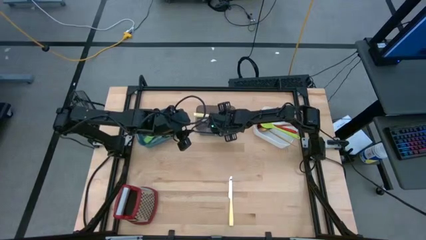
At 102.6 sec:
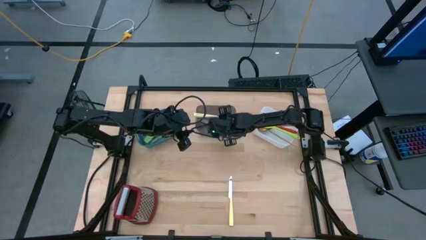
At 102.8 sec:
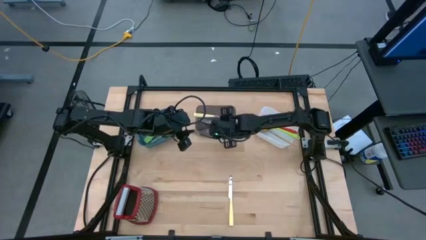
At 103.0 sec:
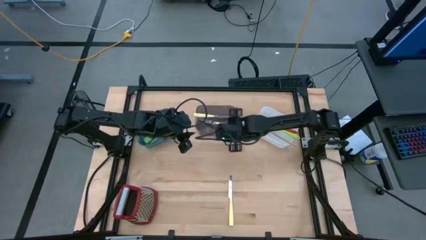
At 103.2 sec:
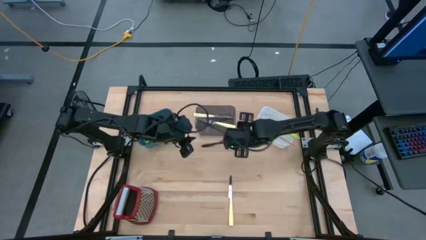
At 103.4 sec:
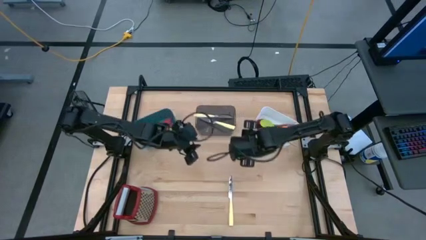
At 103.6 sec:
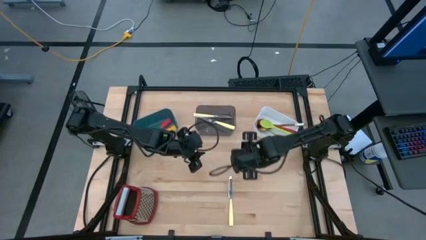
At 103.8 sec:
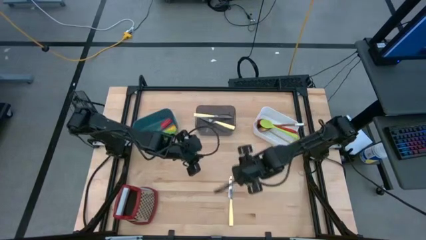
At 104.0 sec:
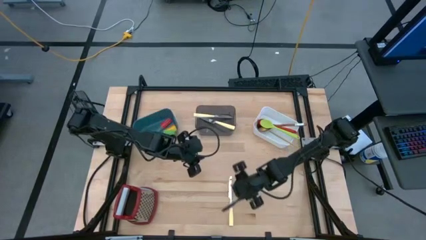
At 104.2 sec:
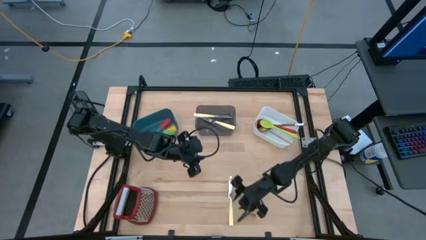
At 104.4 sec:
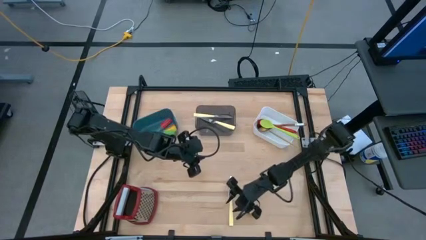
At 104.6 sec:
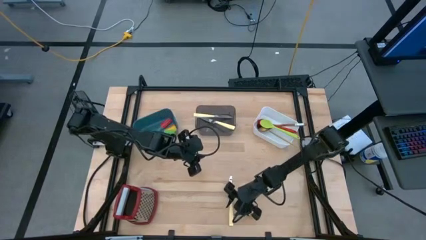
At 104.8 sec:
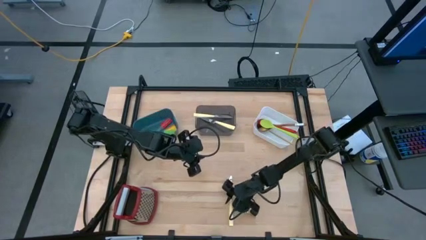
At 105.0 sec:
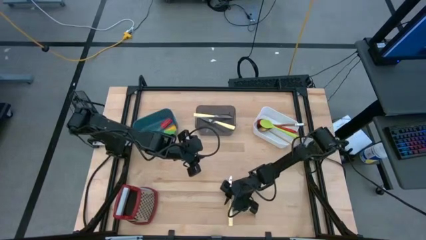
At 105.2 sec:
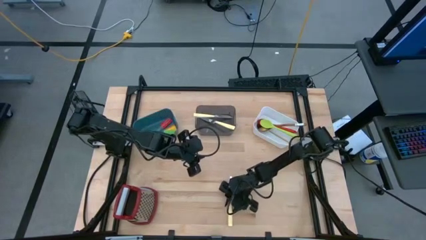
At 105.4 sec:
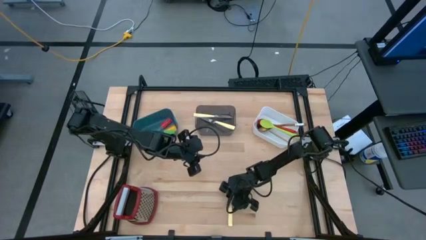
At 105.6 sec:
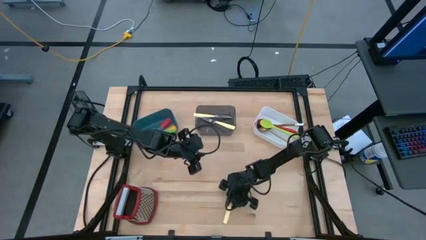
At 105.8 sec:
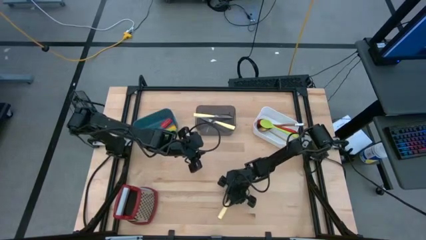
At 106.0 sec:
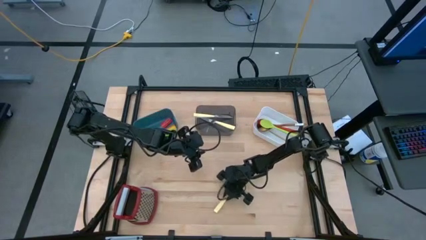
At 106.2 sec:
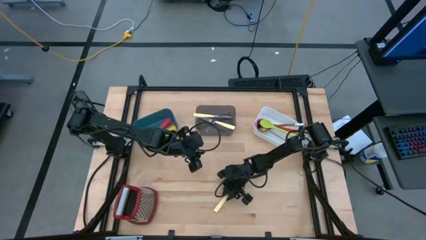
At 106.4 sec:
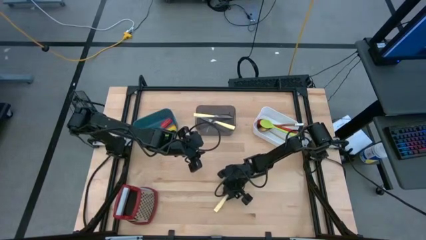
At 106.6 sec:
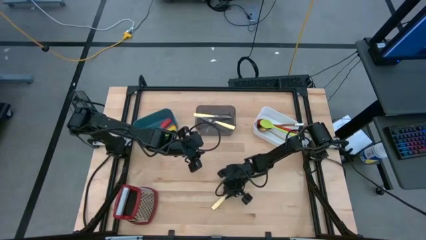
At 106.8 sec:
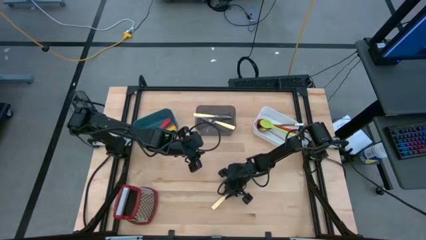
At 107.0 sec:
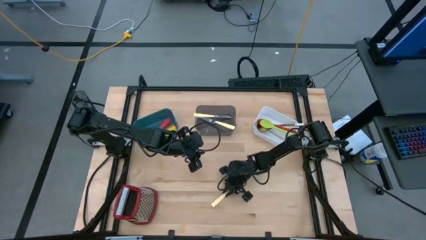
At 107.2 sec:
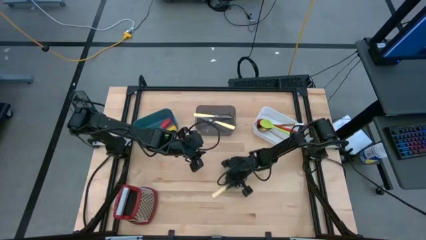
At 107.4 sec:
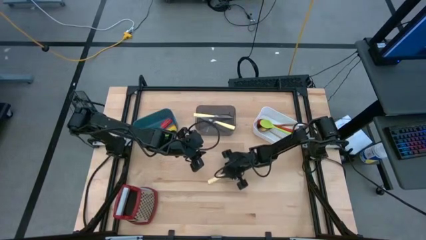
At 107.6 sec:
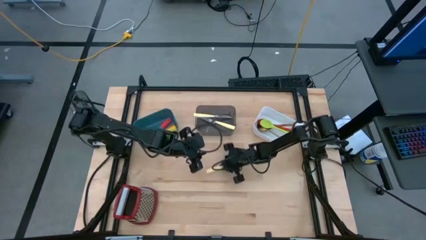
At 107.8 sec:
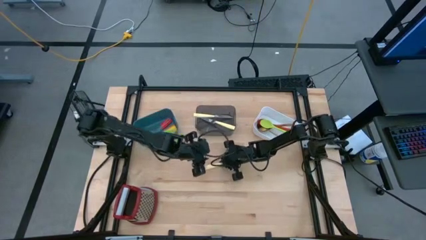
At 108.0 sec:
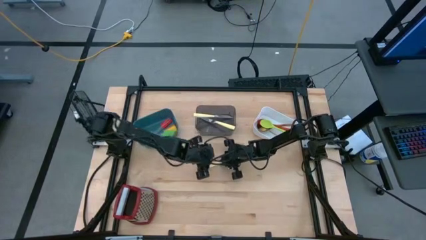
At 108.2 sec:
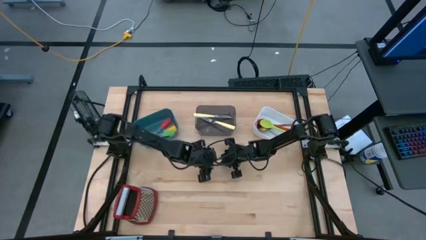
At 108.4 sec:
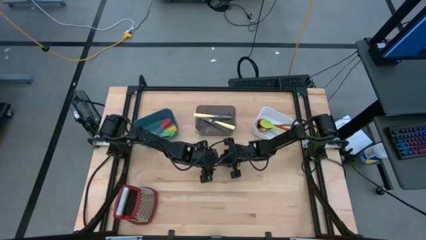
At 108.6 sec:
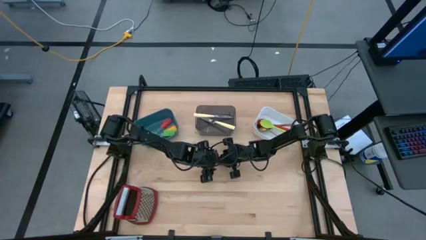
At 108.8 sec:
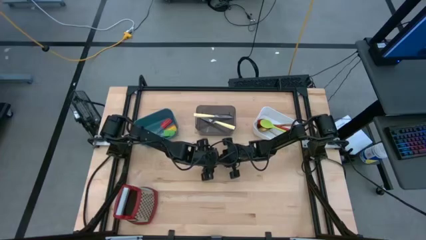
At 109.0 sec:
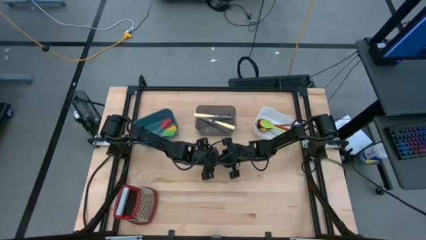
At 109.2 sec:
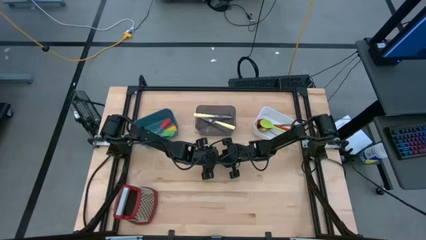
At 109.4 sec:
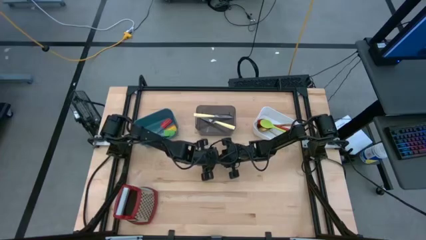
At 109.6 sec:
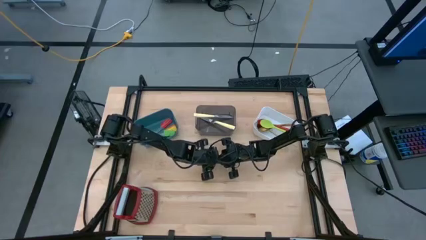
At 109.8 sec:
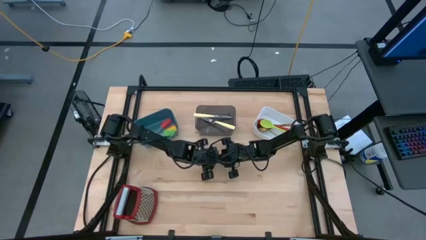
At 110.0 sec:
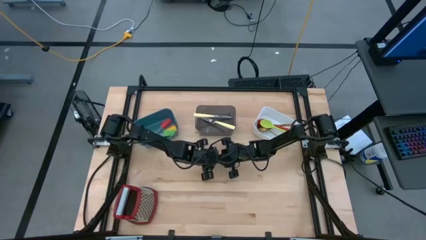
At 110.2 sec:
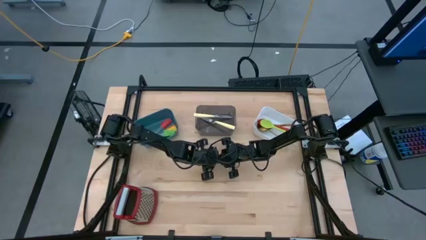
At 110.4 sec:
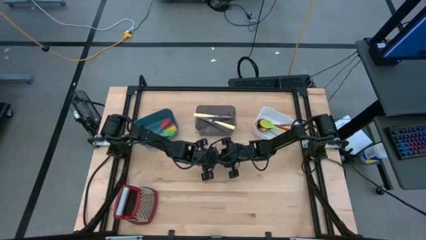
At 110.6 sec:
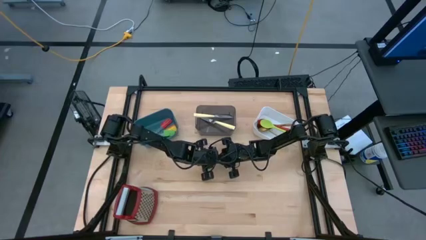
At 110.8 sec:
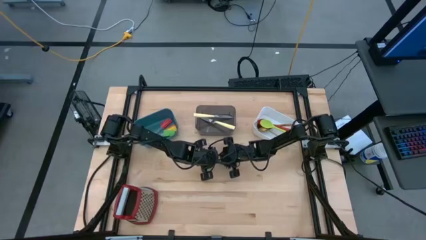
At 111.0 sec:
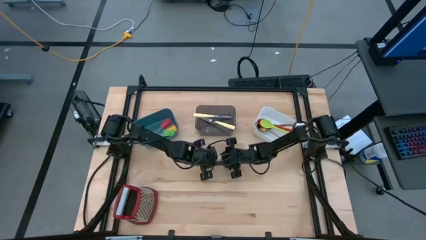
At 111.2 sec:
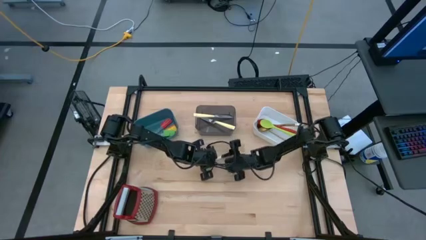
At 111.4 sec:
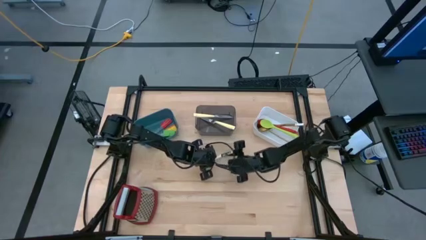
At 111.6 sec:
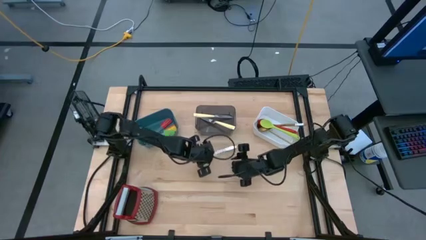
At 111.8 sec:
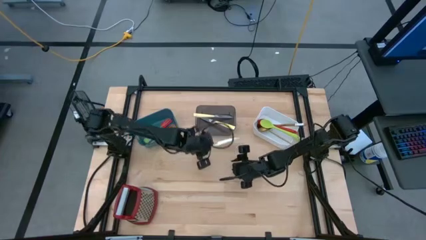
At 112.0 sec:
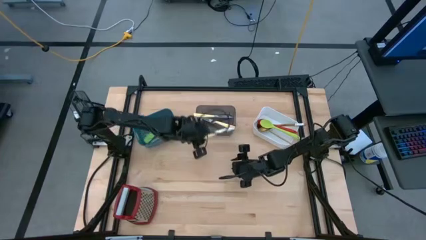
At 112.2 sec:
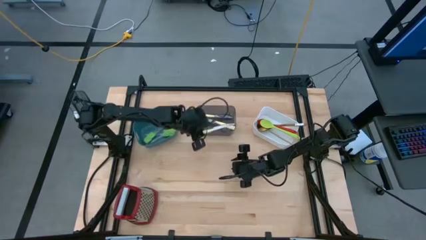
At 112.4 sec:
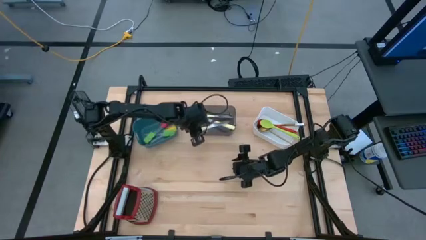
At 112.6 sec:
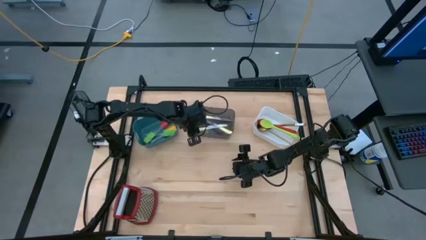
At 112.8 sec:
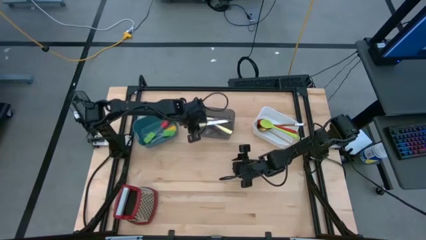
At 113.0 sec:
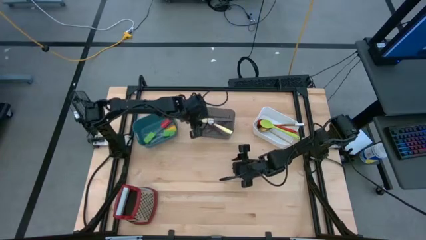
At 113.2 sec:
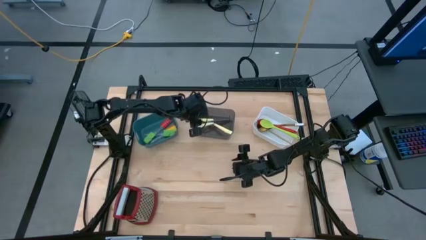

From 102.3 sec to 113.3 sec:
Task: Pick & Place Kitchen Items
Put the yellow table knife into the black bin
